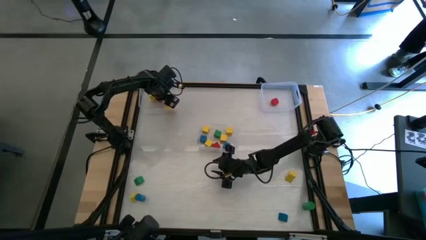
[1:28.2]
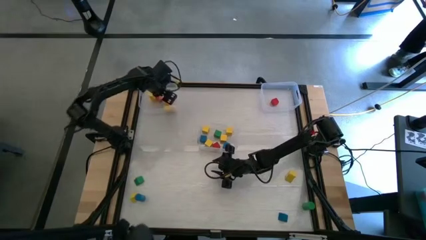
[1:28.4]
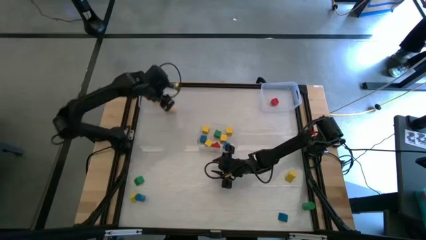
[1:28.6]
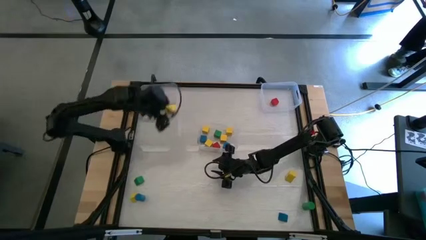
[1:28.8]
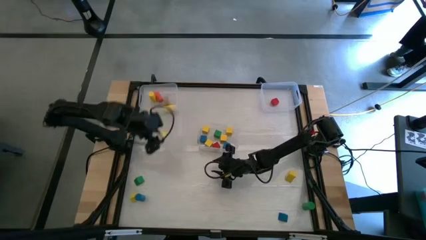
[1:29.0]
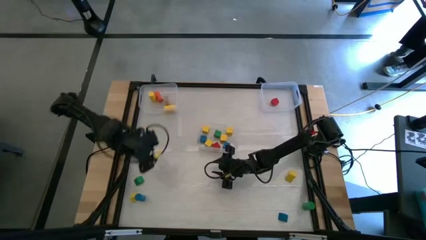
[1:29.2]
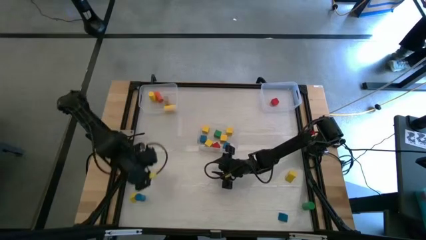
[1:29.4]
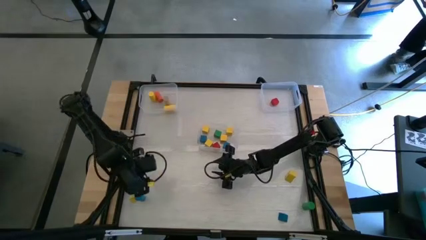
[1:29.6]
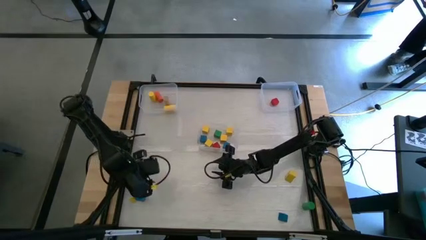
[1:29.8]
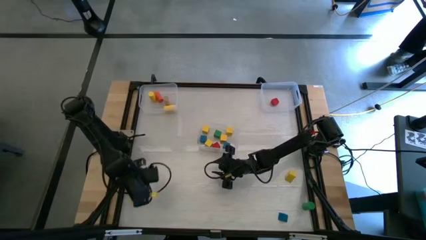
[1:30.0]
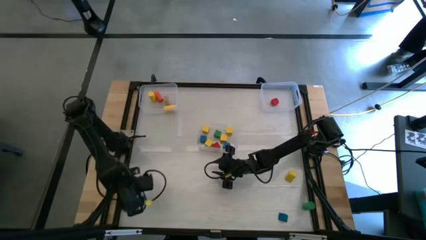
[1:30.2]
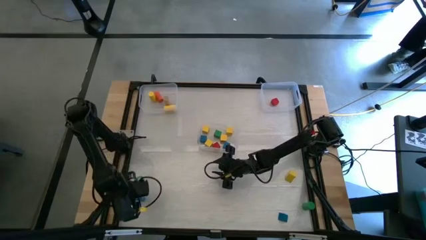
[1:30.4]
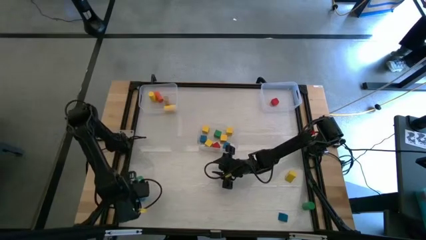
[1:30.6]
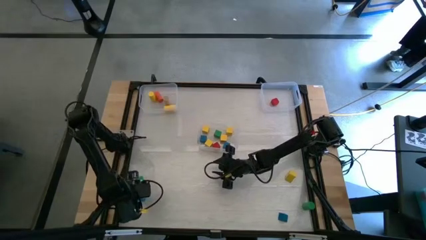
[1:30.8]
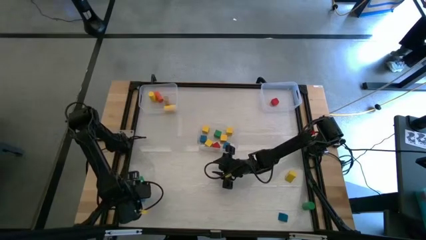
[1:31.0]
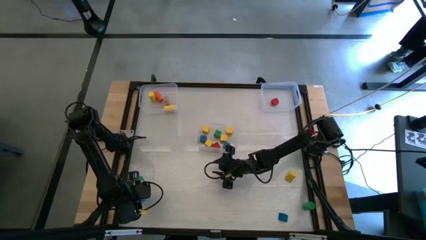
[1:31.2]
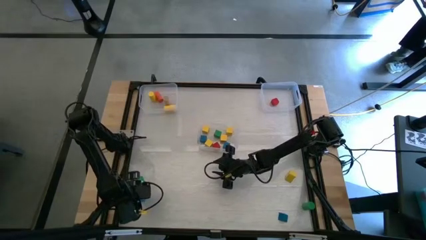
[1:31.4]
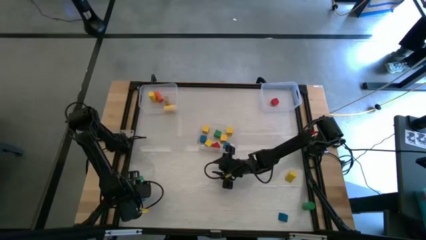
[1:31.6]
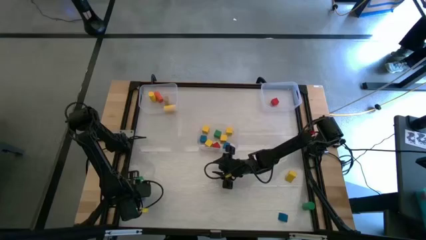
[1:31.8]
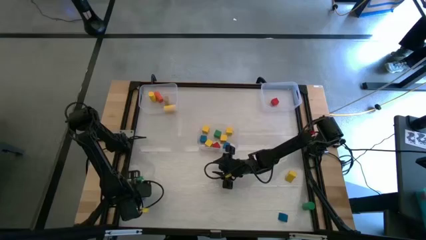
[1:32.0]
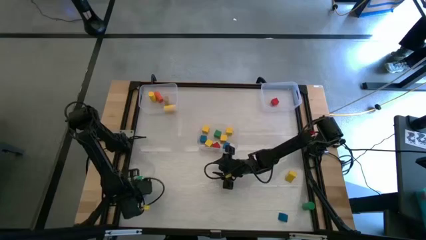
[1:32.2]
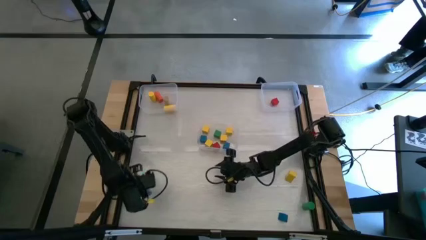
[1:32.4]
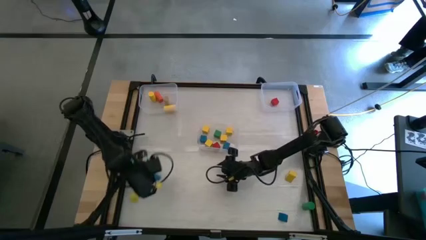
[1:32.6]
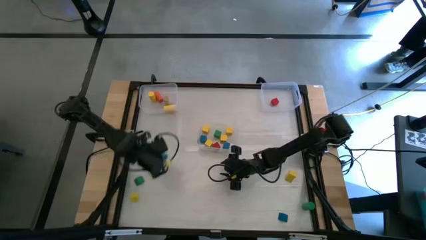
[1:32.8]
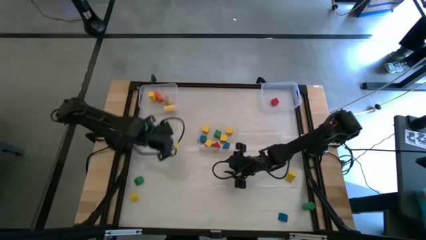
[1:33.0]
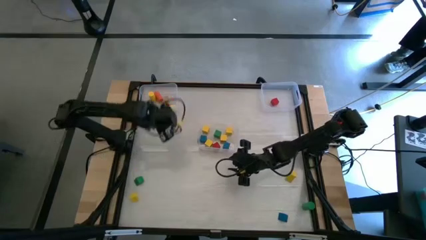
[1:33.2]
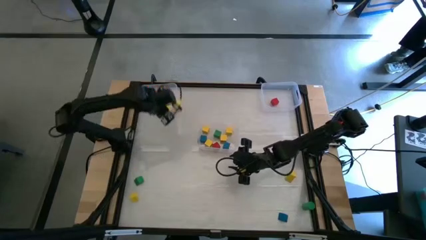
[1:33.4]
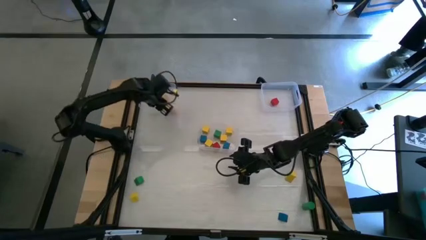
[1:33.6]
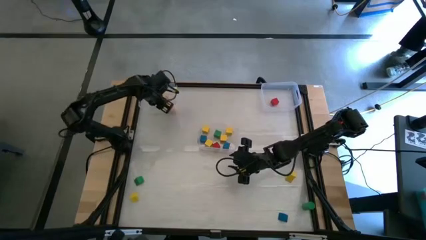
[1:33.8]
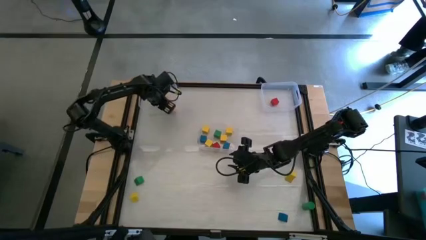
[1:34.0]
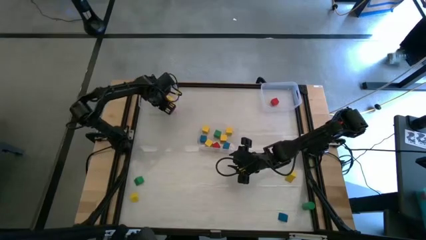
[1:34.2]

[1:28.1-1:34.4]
Task: Sort blocks by size
Put the blue cylindrical block into the top left transparent bin

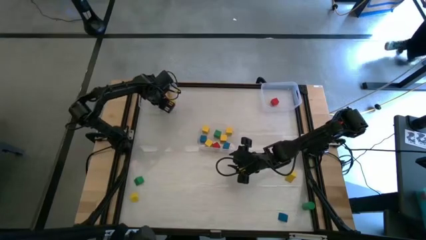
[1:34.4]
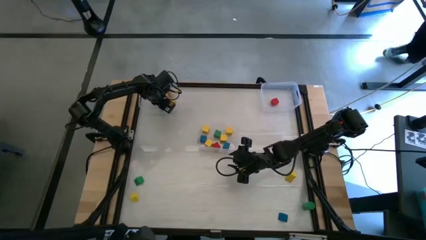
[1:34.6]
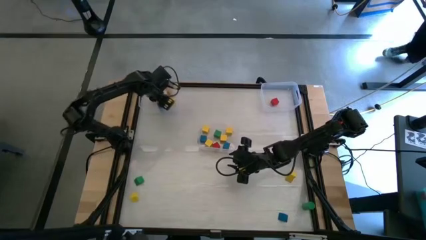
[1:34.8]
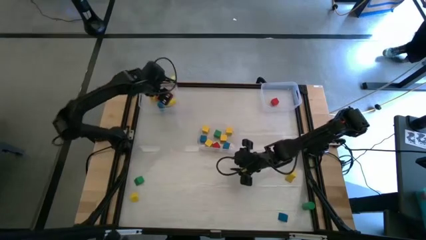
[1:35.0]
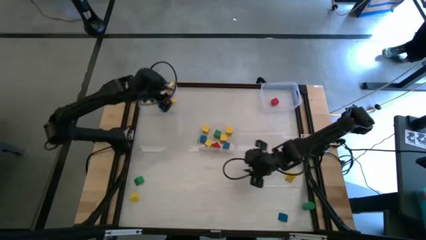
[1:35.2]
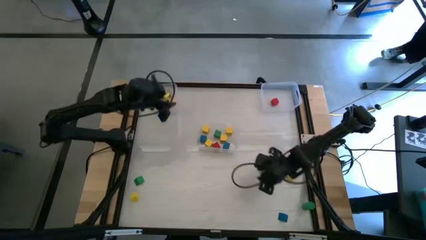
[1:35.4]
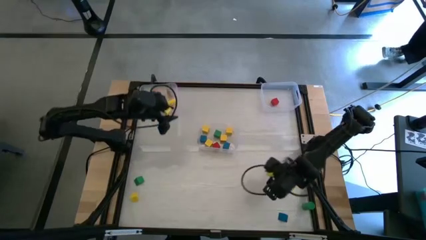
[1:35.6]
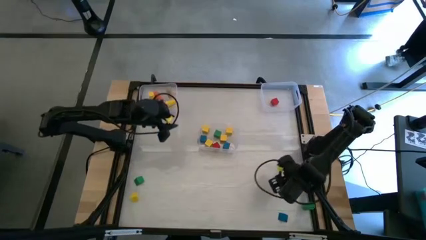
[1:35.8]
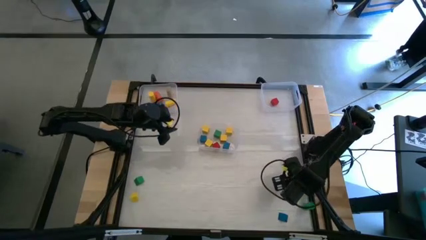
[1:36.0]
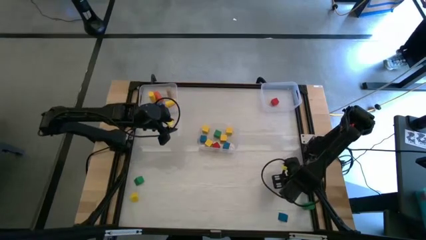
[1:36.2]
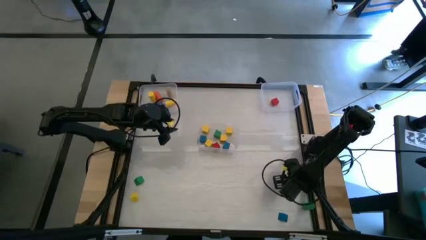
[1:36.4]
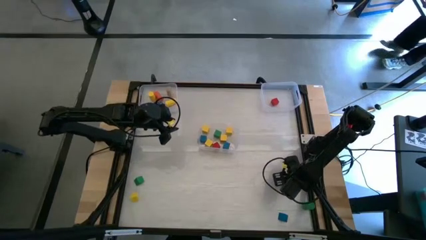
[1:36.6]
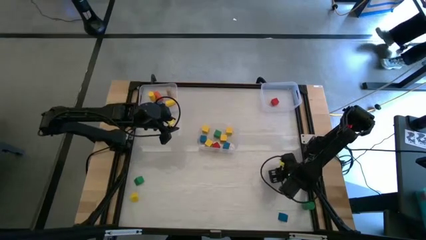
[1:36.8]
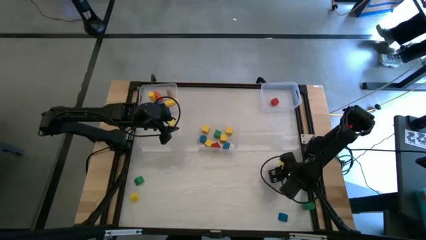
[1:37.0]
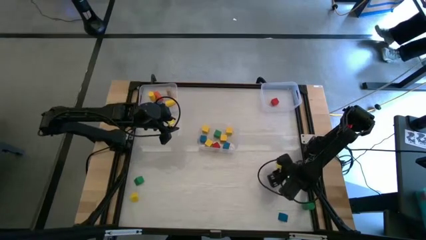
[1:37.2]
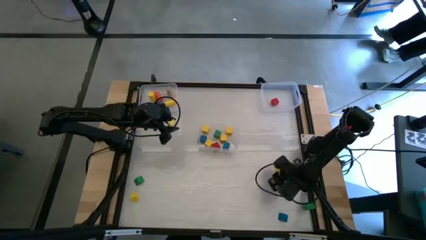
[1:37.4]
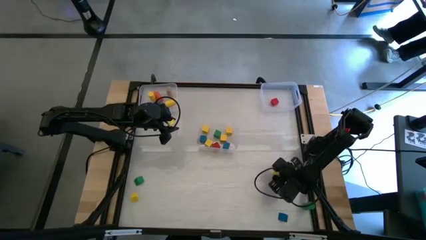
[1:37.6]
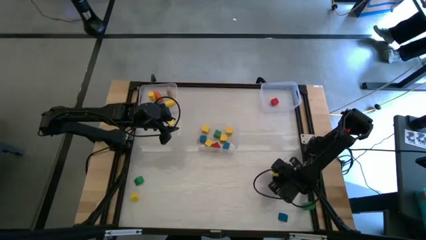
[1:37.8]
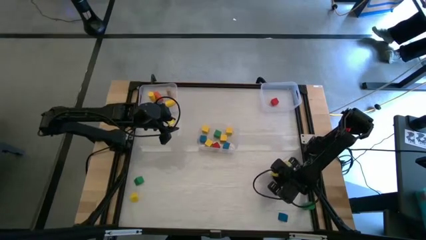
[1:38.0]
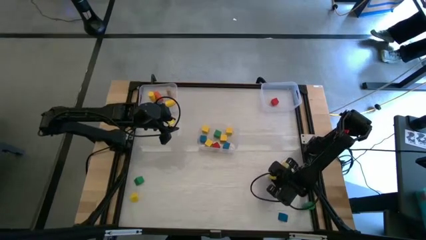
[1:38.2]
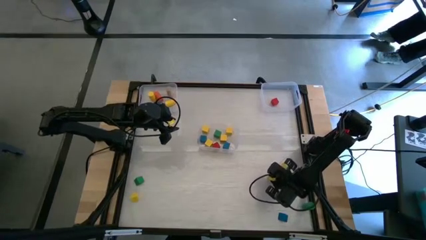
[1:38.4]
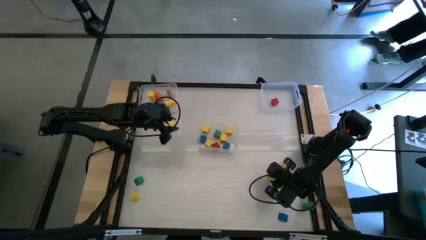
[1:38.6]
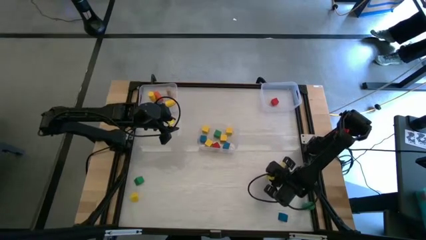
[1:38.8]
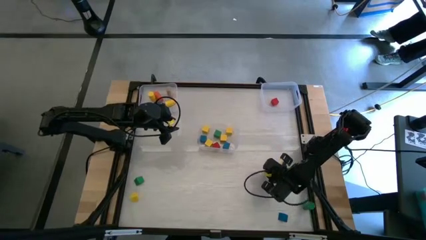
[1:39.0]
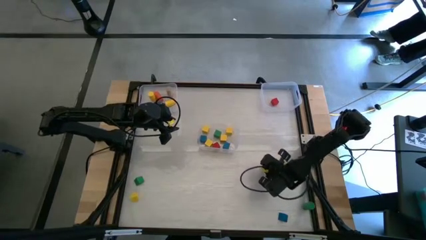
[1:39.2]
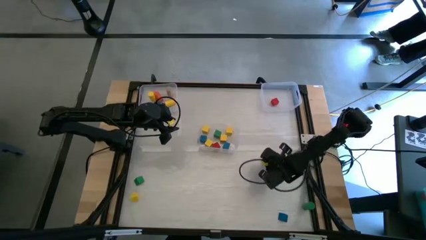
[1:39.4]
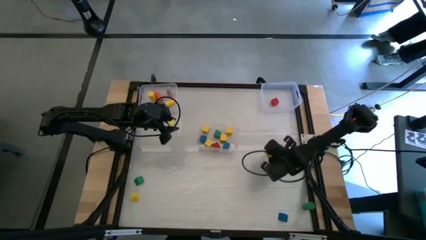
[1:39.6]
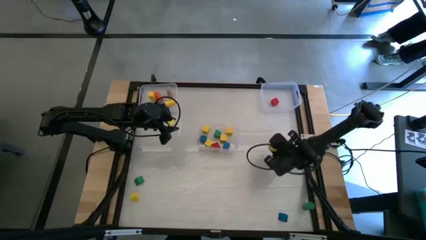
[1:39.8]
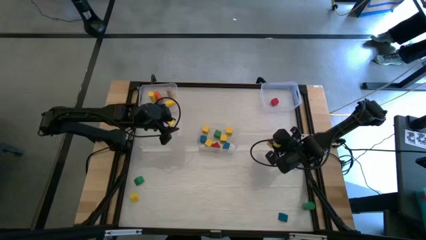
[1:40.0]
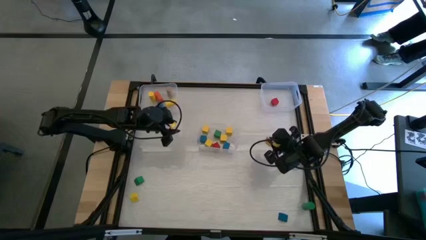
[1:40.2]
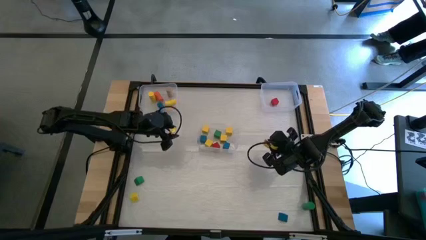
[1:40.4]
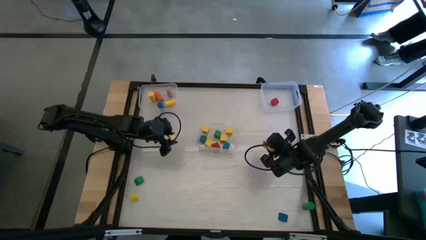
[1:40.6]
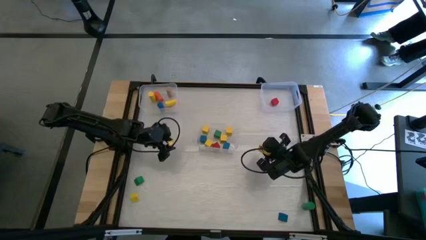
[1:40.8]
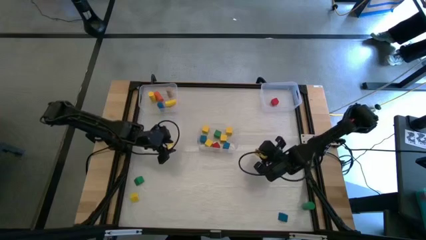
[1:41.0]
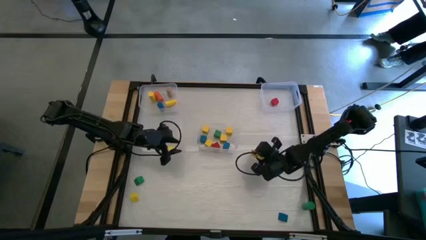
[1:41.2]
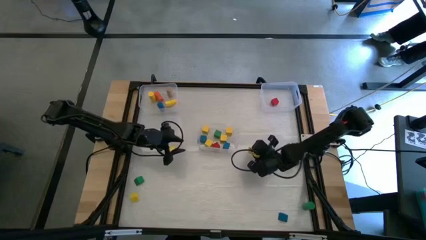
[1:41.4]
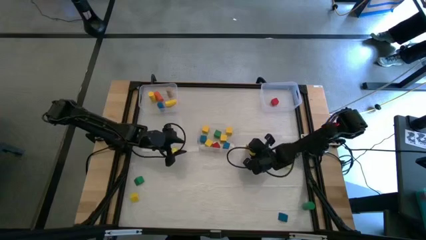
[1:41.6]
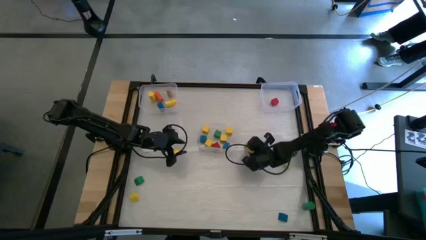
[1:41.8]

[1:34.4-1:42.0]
Move the yellow triangular block to the bottom of the table

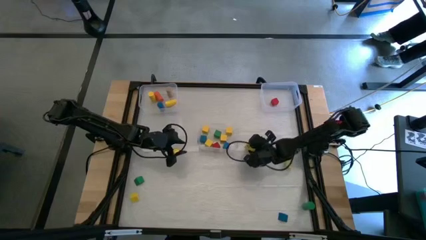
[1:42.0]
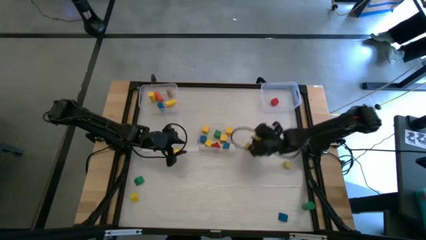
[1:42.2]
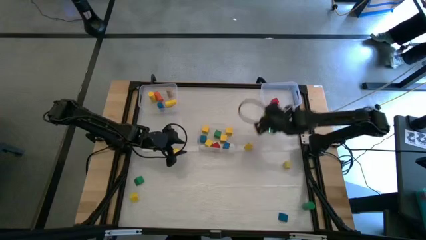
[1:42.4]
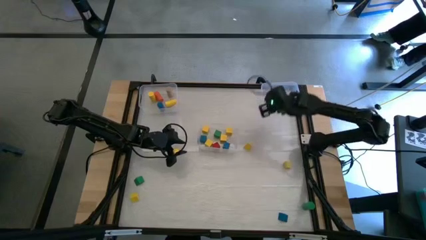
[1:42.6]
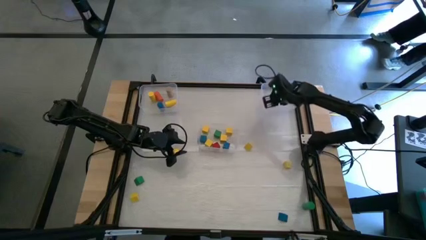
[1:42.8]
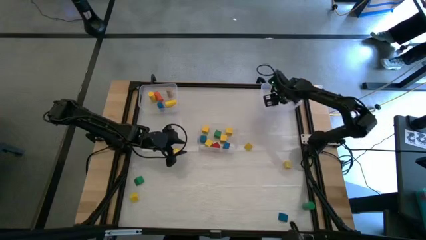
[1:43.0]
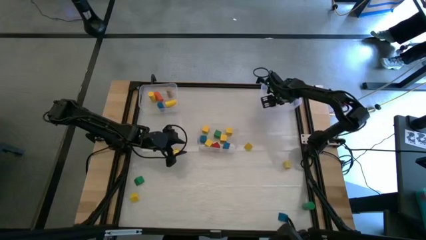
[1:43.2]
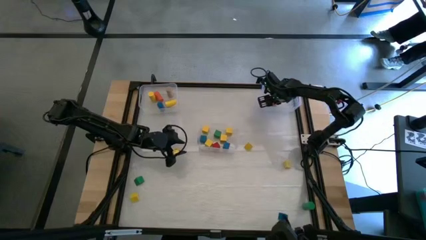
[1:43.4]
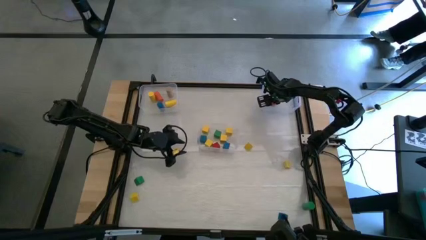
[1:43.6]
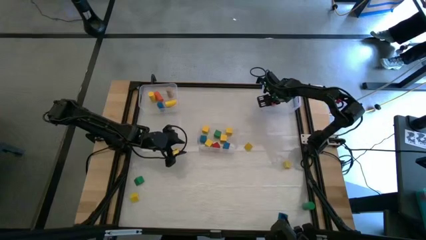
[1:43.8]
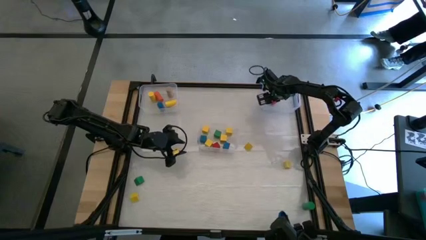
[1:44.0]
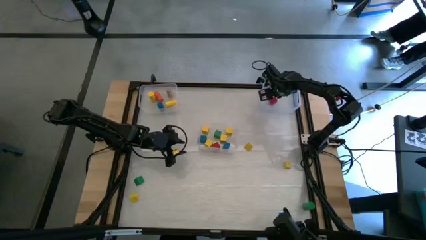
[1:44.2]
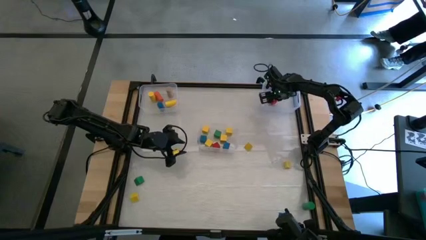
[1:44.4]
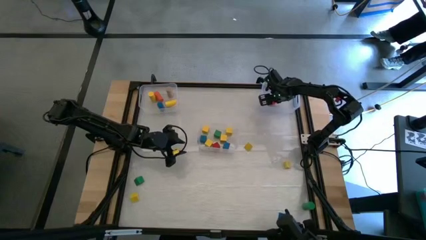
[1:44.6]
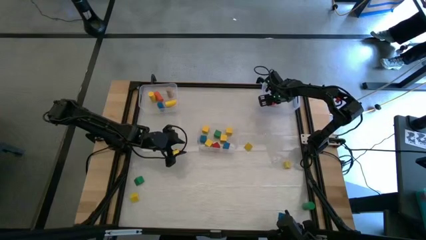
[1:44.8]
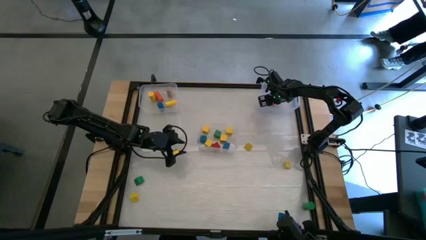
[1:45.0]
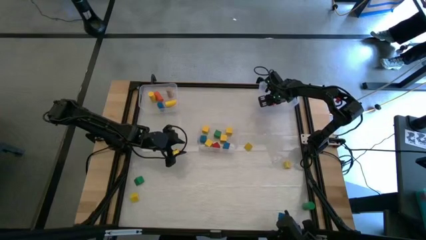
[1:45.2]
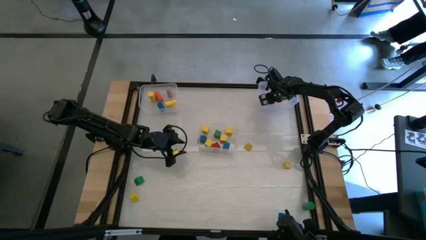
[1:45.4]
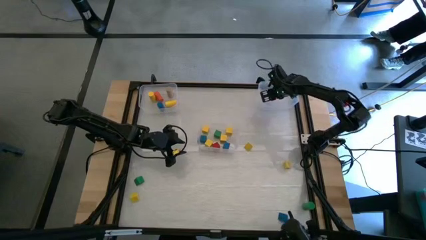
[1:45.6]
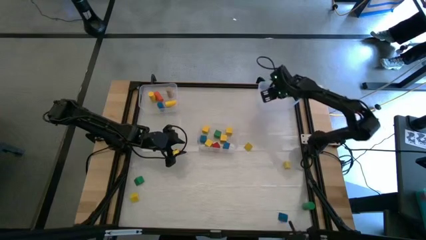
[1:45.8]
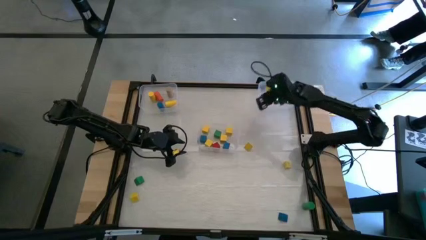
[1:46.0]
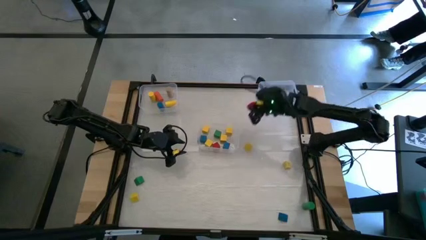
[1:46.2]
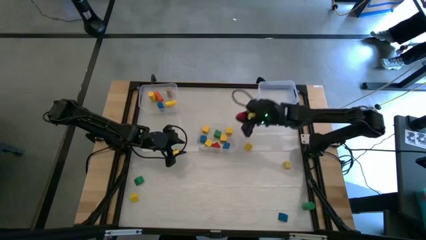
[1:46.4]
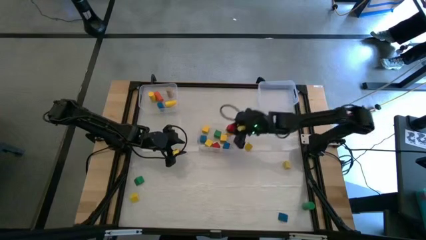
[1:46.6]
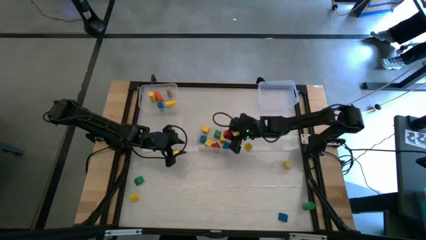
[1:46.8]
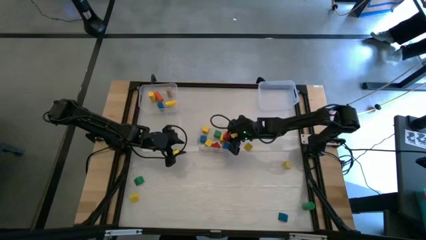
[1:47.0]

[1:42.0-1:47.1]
Put the red square block into the bottom transparent bin
